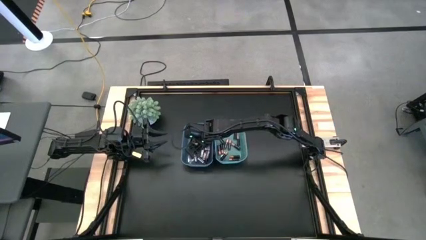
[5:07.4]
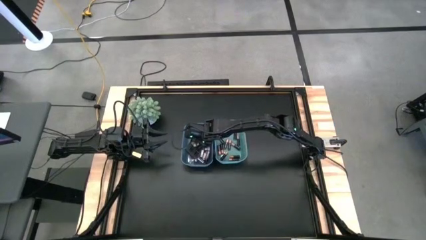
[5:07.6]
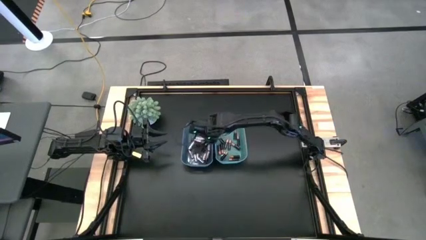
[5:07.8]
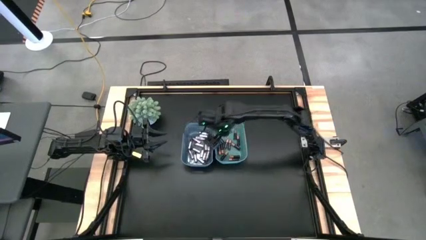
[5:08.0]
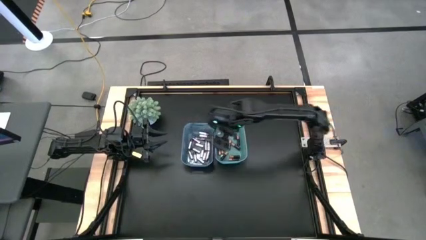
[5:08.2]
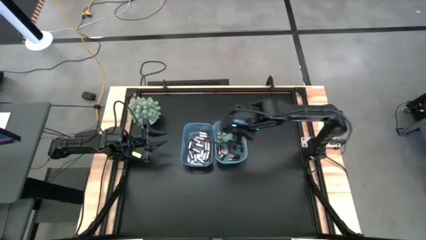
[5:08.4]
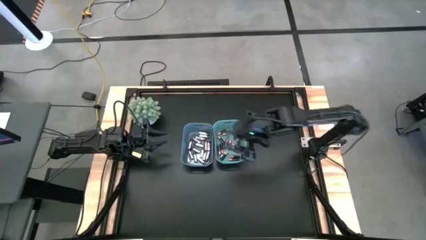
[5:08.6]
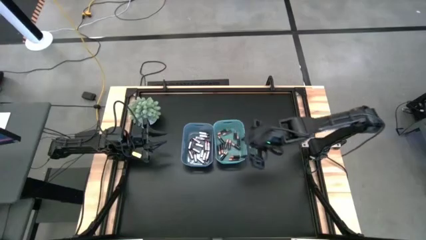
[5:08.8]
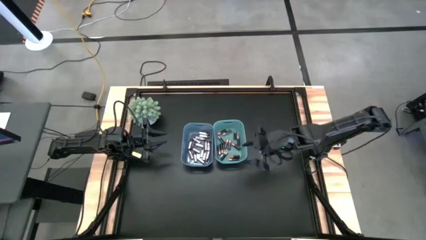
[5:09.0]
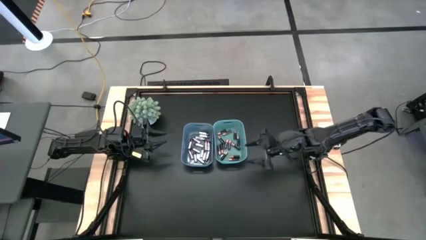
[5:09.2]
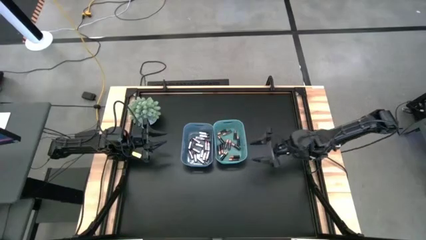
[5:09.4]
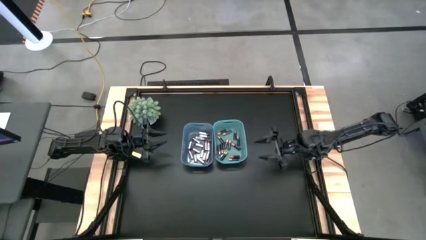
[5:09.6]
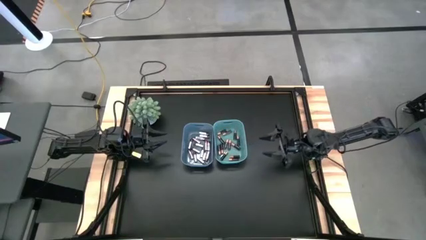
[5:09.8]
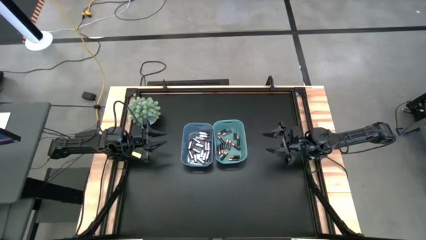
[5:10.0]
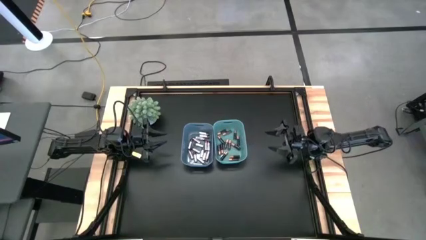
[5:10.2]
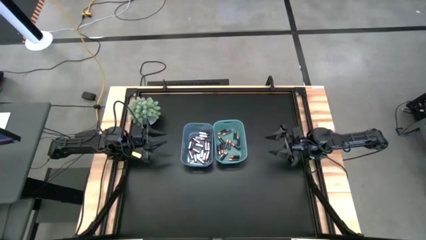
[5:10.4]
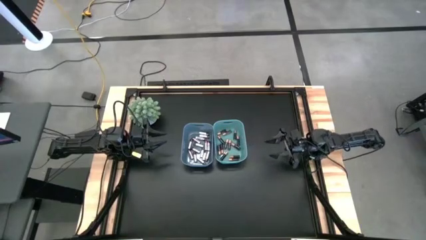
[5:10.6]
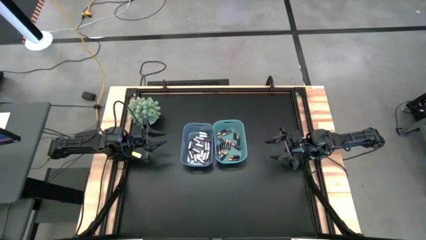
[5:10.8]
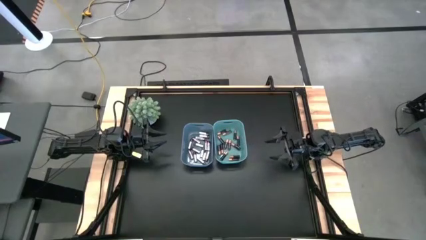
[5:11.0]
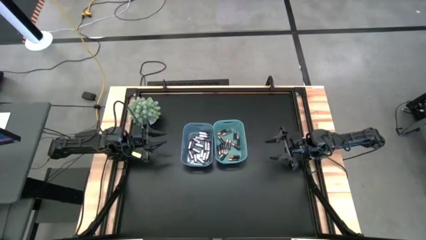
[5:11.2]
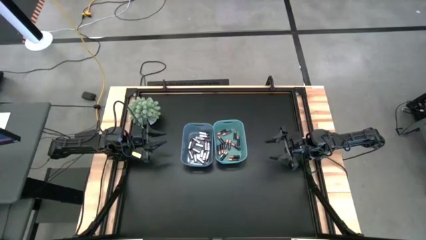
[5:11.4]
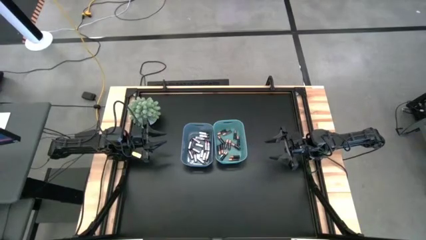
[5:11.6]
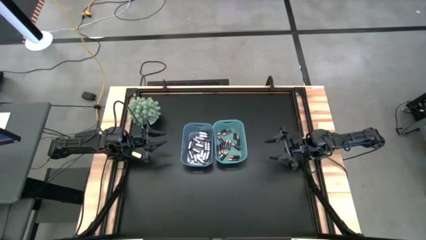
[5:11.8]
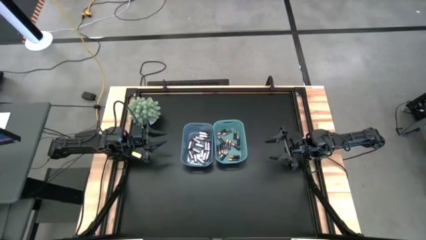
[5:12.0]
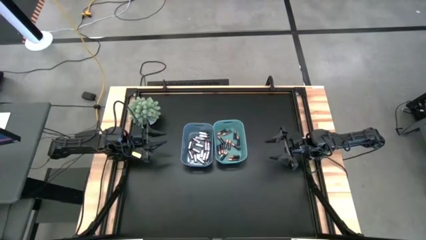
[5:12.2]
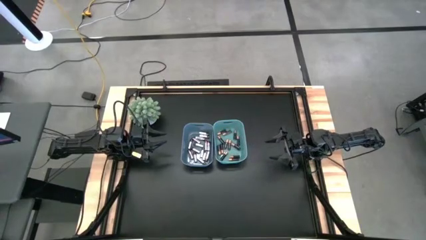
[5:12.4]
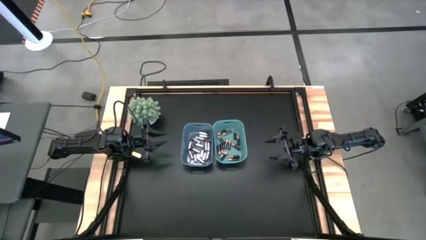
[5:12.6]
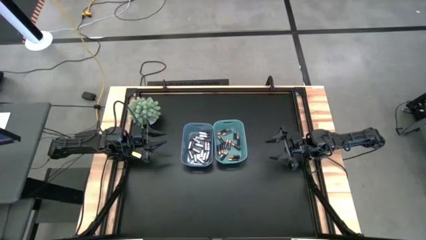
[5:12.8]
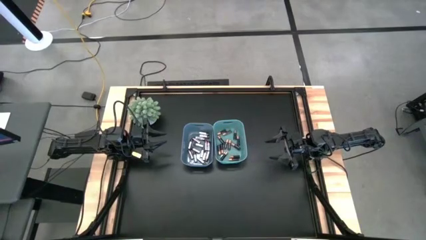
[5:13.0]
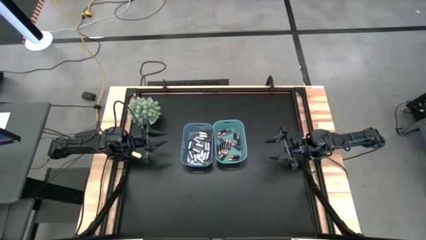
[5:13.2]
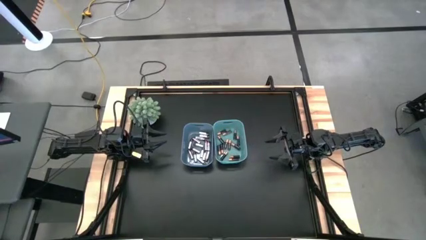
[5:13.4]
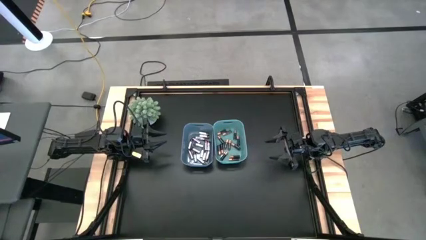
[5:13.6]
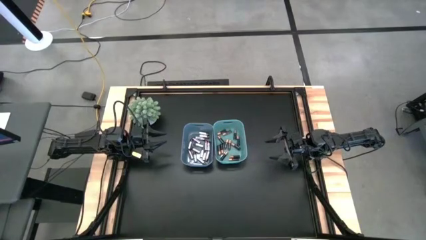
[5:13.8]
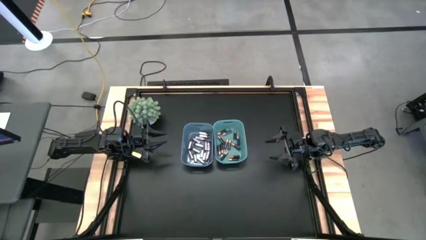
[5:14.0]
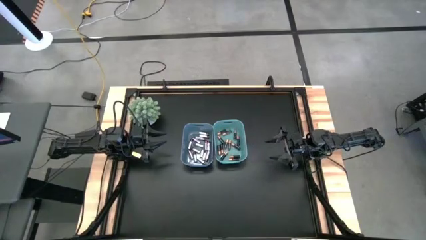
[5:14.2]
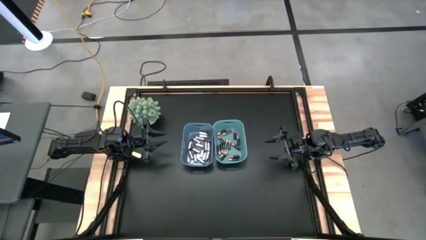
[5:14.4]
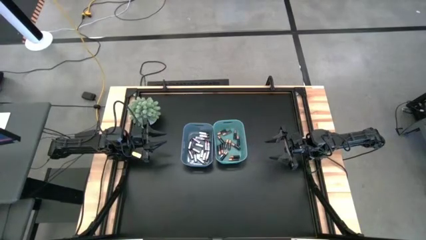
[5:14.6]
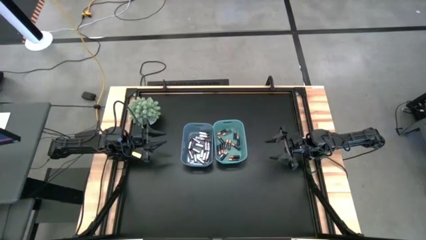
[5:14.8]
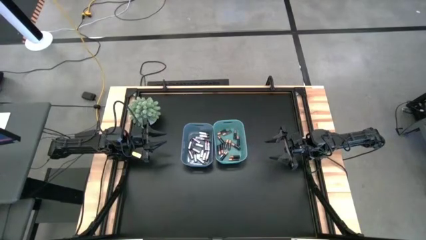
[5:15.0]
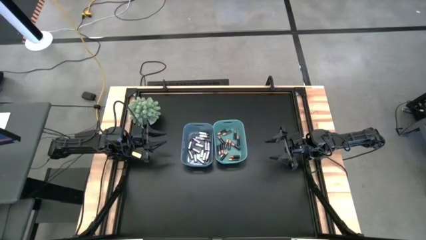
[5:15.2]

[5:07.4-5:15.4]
Task: Sort batteries
Return to Home Position

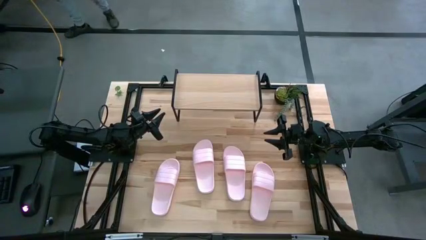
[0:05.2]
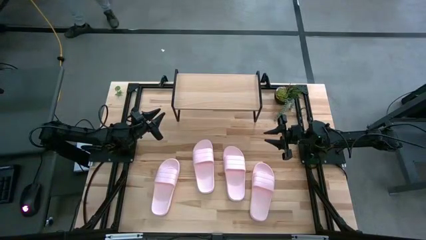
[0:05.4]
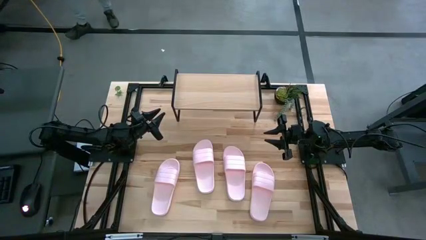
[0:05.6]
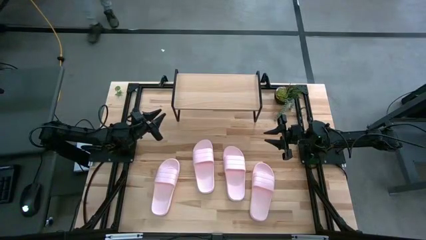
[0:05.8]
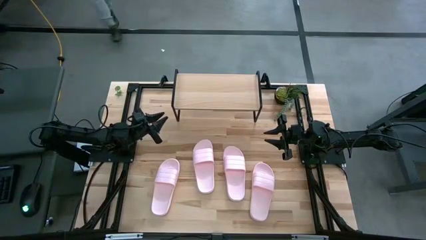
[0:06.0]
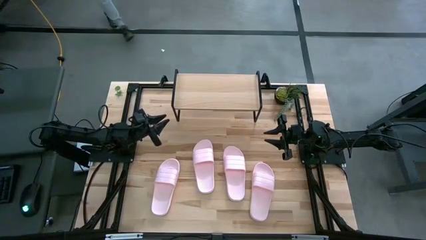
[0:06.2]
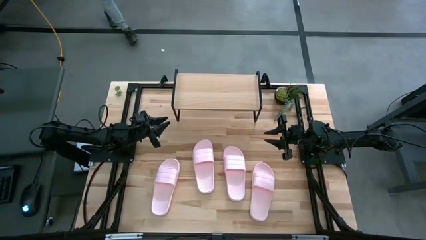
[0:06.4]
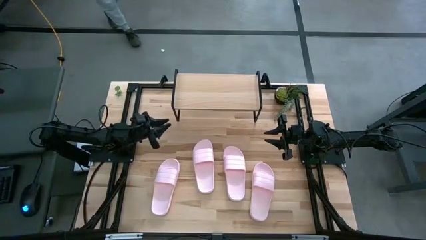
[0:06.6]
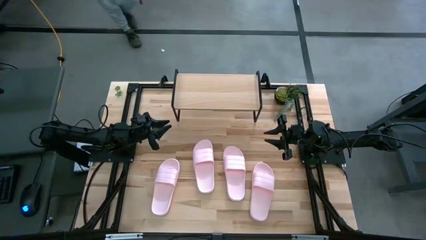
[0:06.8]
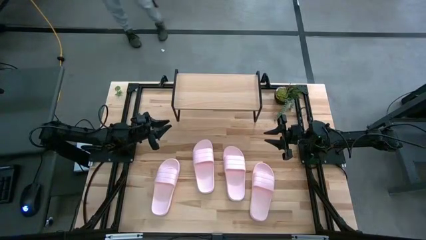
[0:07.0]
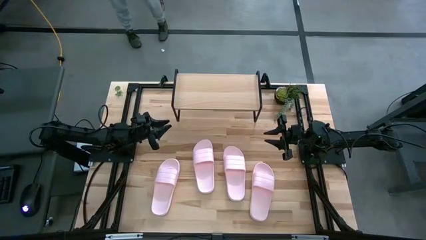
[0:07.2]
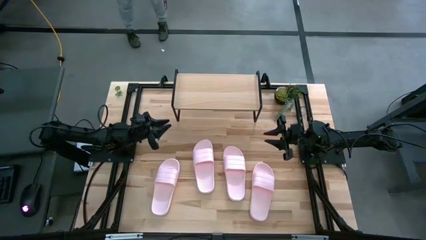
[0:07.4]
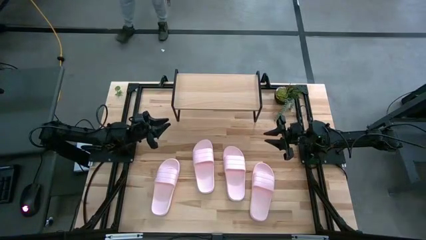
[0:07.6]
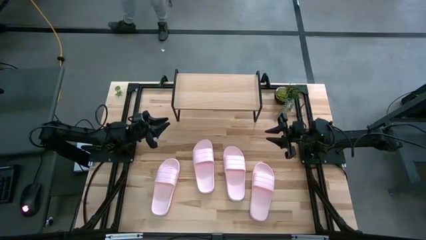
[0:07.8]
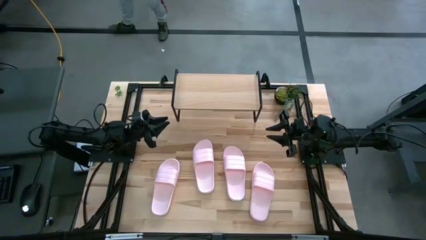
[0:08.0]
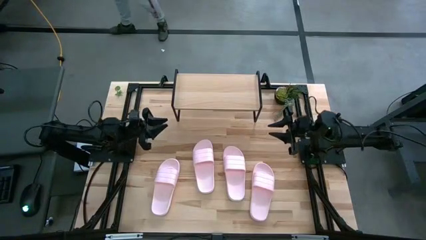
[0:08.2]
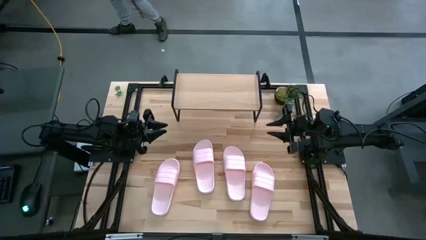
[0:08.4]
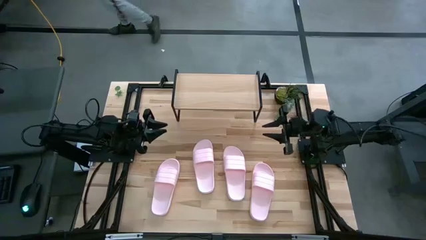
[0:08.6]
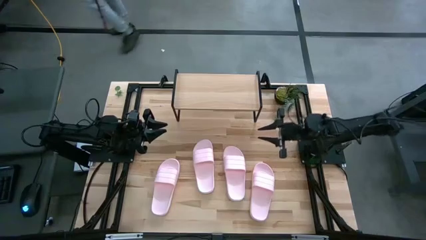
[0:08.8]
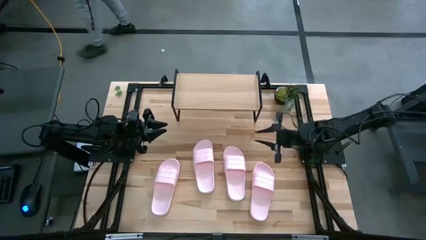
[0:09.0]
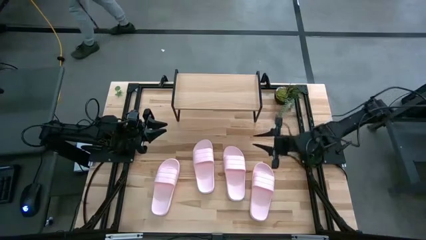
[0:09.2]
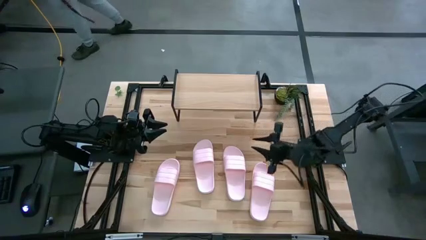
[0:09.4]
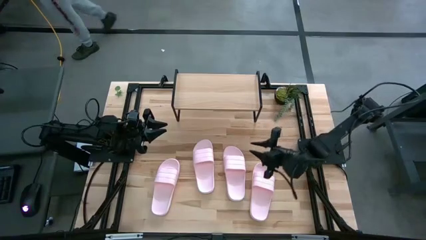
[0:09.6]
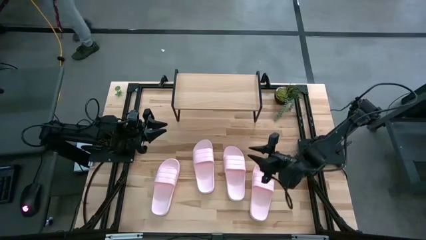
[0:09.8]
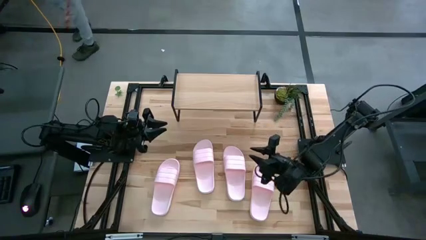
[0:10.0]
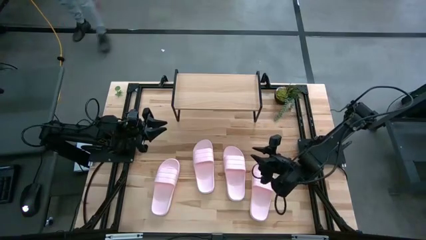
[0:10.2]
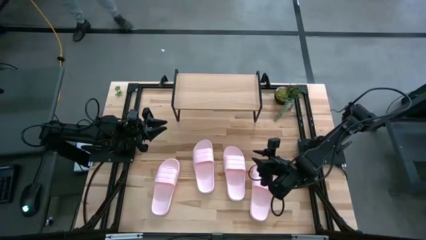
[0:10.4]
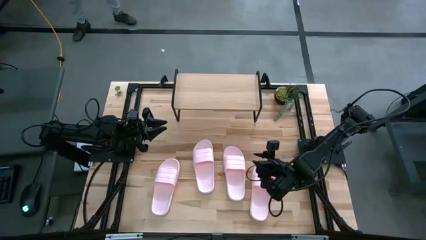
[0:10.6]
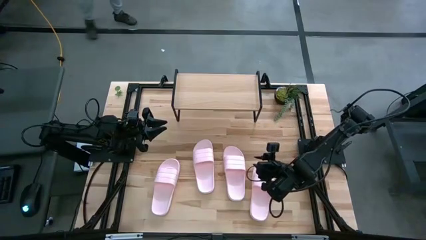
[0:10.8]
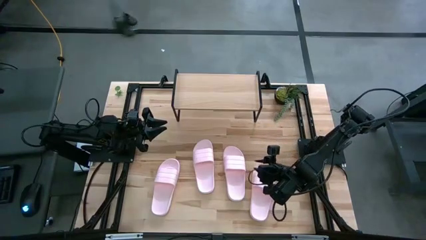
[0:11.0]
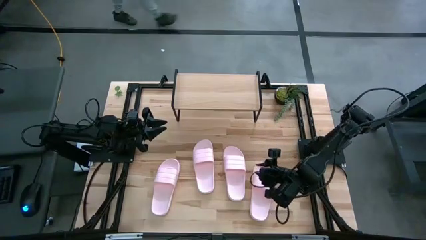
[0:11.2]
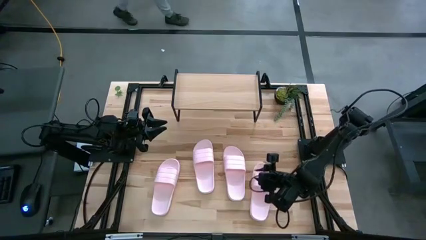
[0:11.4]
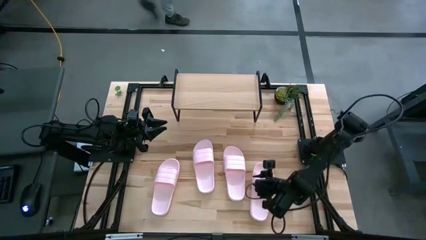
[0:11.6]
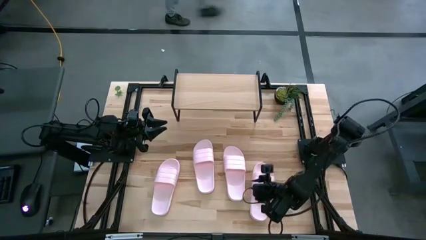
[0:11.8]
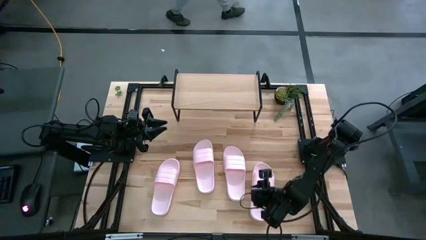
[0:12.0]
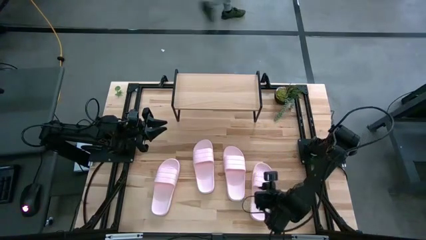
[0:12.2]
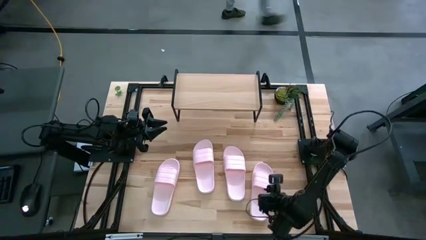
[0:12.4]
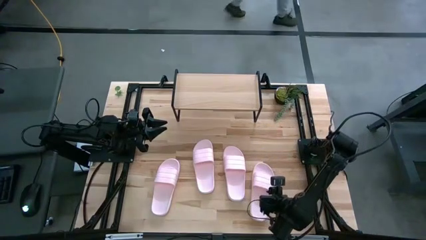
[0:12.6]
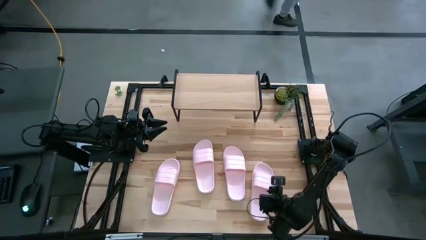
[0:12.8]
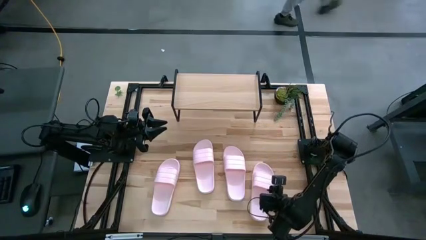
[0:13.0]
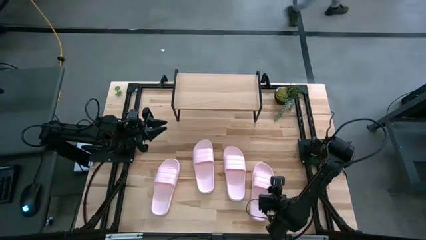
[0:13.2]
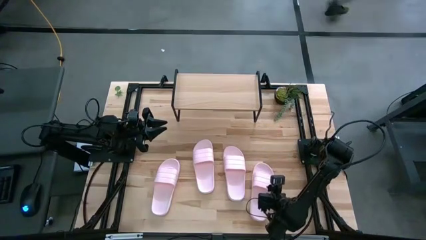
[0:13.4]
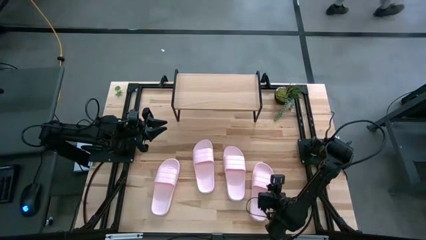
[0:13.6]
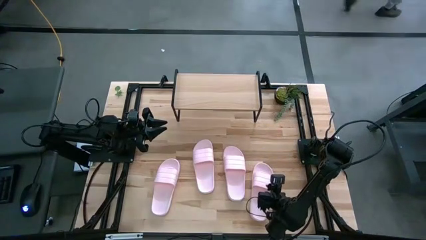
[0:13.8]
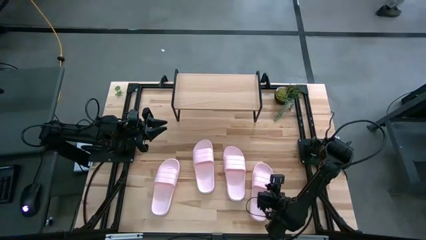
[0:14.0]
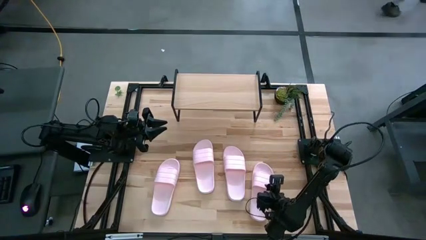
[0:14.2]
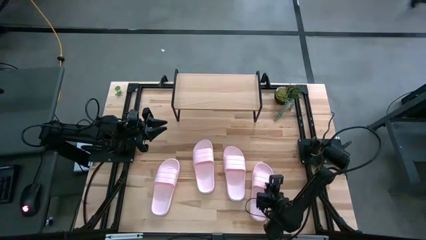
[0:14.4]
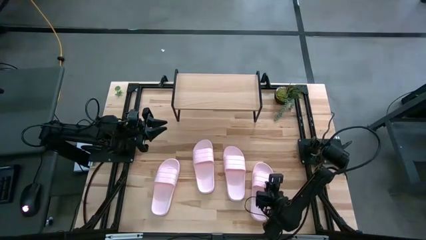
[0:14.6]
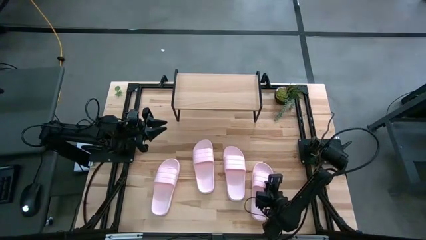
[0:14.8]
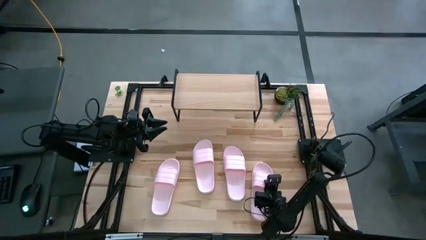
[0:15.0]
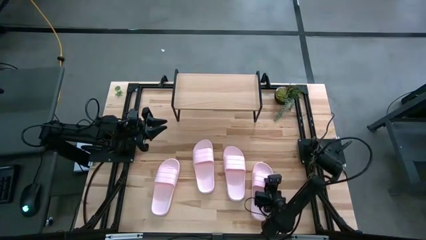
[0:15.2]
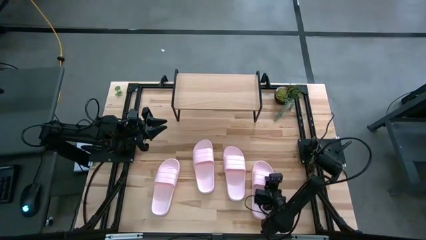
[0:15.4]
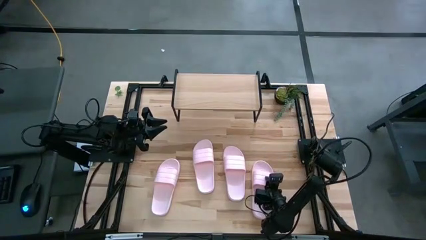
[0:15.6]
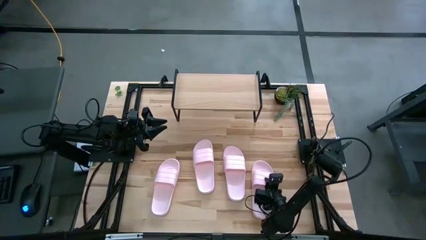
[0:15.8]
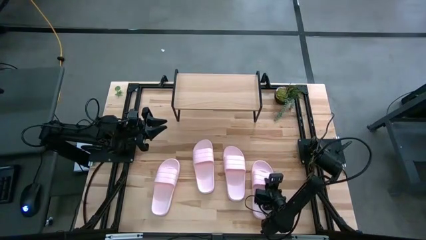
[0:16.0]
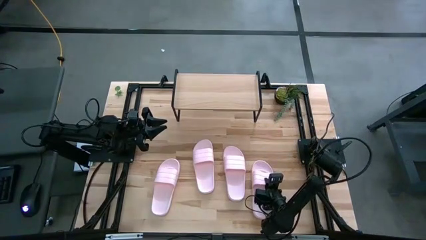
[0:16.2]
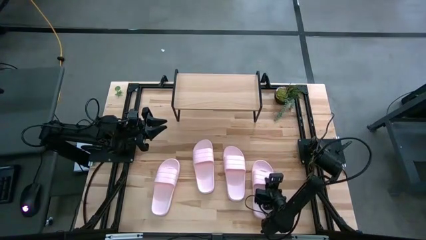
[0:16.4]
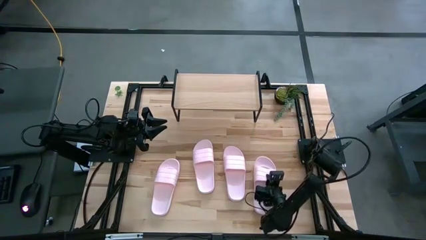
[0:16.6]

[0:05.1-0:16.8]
Task: Pick and place slides into the shelf
Put the pink slide on the shelf
